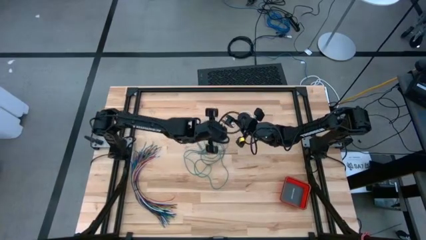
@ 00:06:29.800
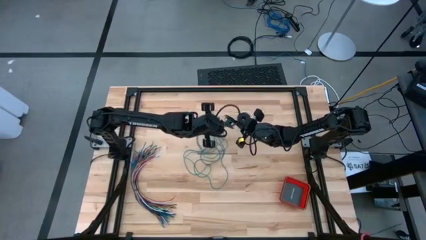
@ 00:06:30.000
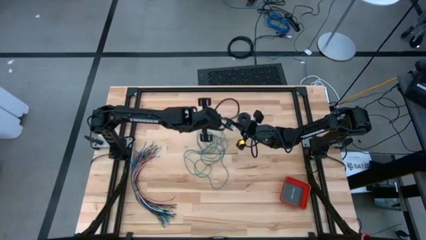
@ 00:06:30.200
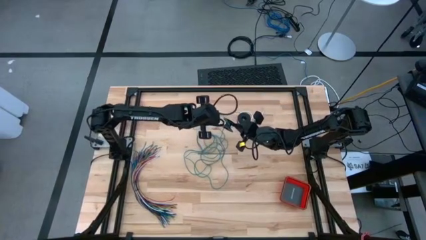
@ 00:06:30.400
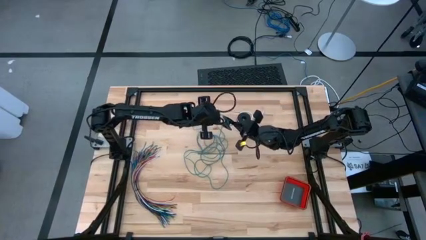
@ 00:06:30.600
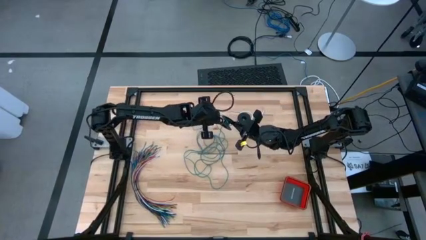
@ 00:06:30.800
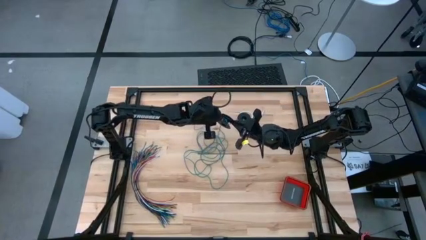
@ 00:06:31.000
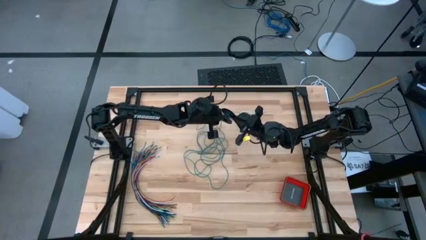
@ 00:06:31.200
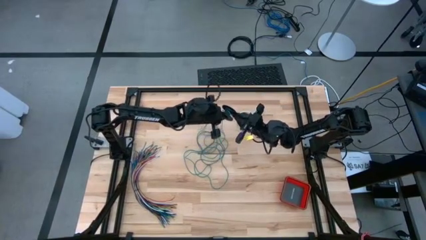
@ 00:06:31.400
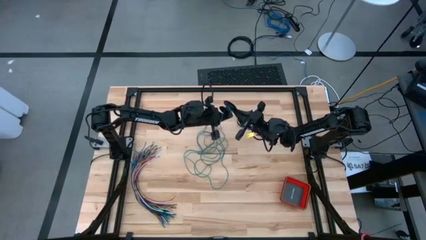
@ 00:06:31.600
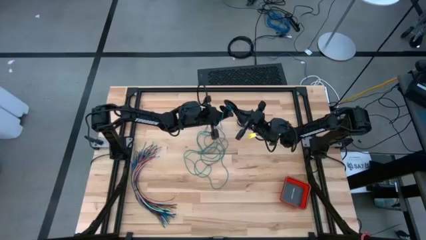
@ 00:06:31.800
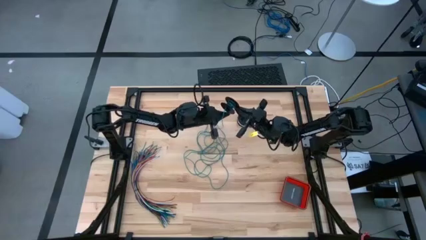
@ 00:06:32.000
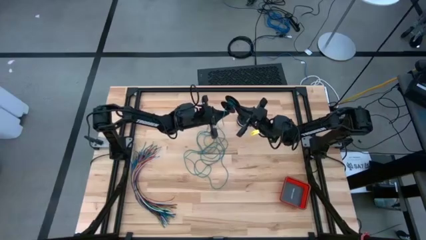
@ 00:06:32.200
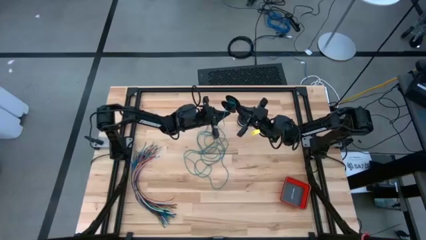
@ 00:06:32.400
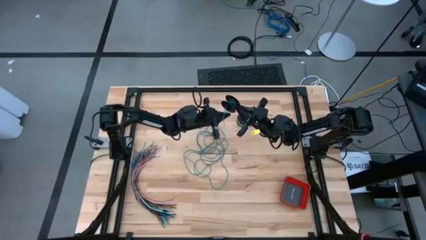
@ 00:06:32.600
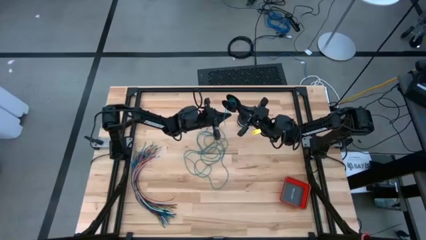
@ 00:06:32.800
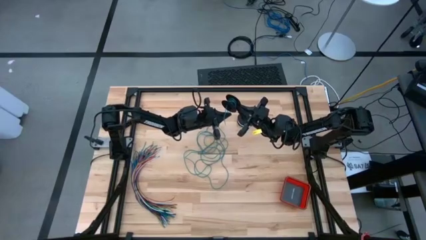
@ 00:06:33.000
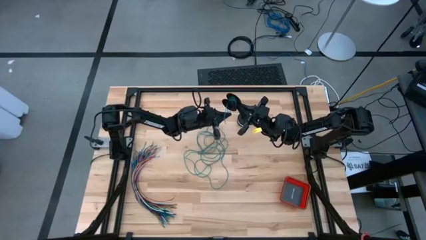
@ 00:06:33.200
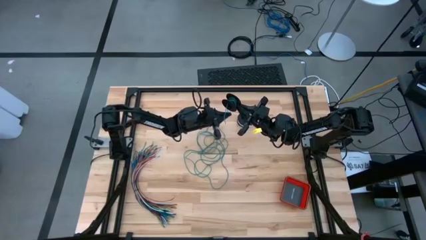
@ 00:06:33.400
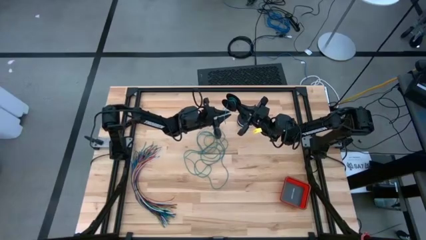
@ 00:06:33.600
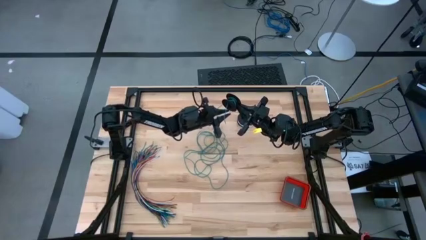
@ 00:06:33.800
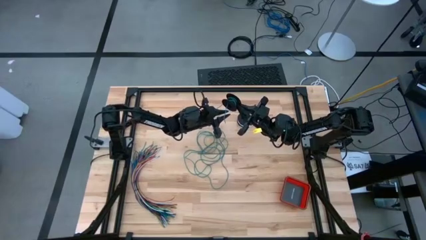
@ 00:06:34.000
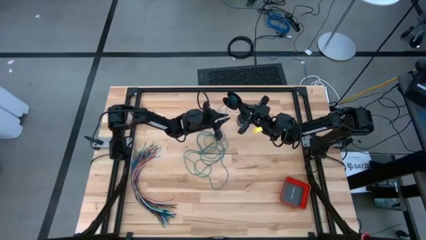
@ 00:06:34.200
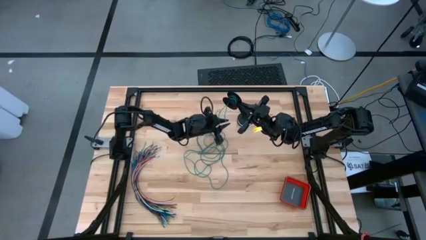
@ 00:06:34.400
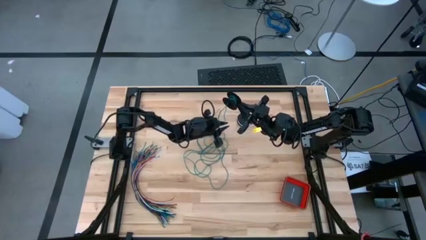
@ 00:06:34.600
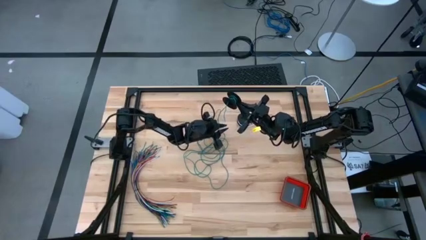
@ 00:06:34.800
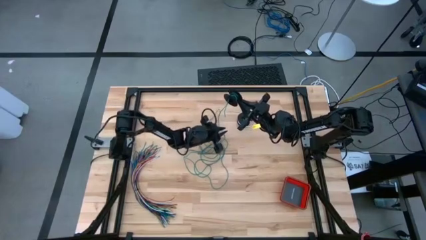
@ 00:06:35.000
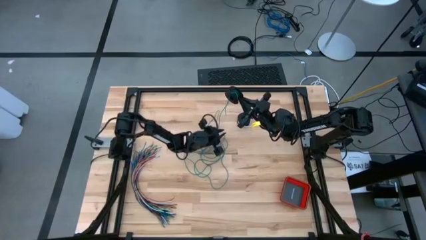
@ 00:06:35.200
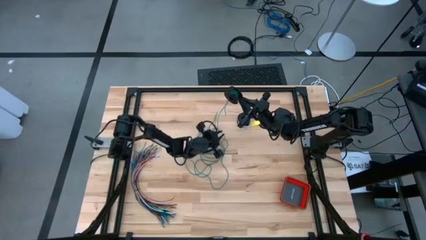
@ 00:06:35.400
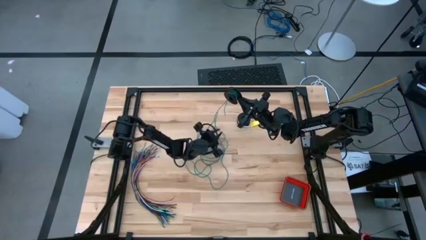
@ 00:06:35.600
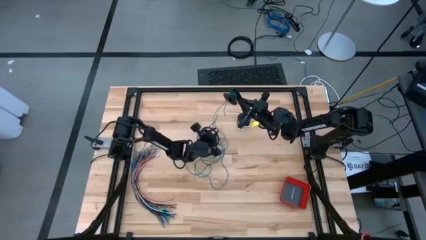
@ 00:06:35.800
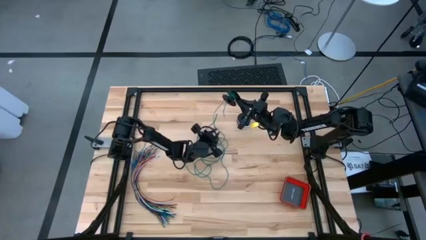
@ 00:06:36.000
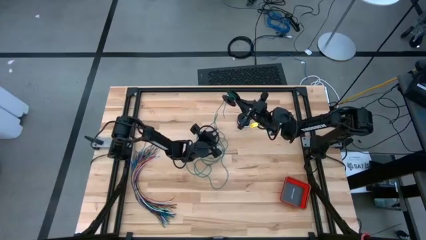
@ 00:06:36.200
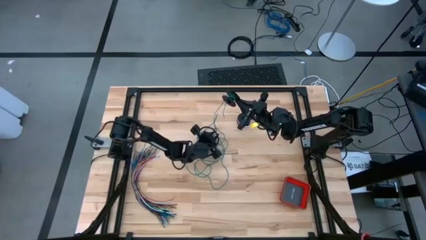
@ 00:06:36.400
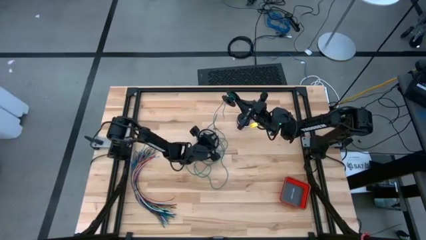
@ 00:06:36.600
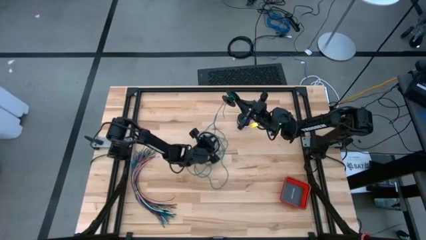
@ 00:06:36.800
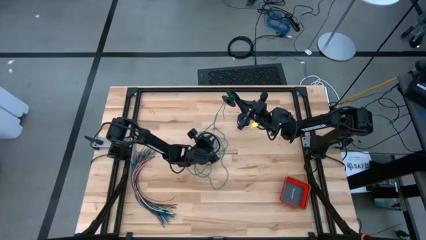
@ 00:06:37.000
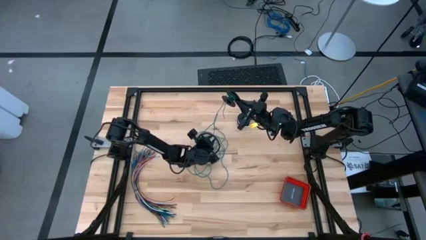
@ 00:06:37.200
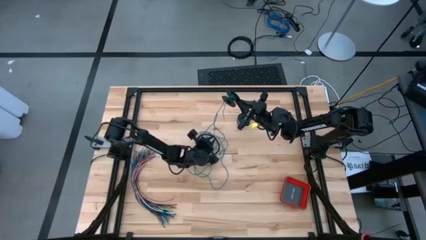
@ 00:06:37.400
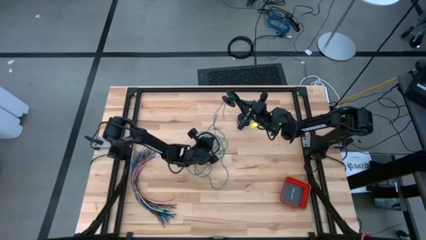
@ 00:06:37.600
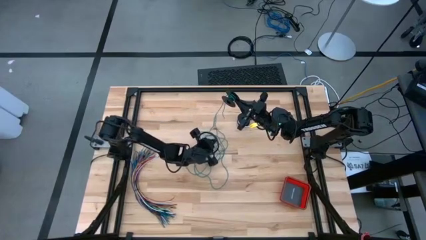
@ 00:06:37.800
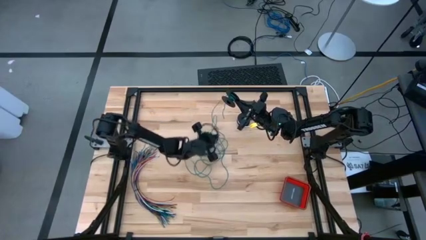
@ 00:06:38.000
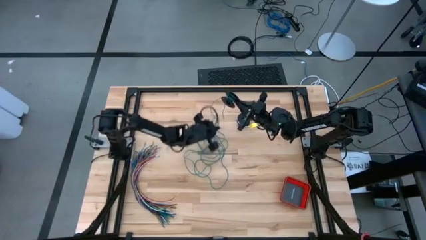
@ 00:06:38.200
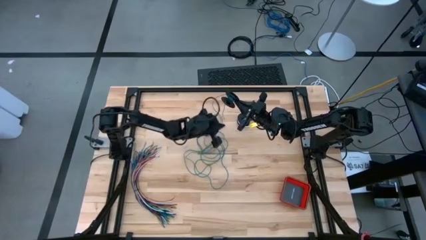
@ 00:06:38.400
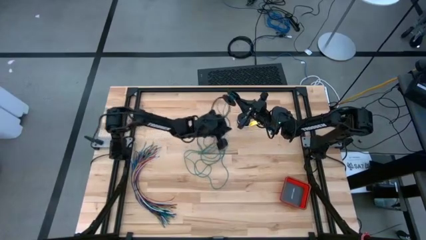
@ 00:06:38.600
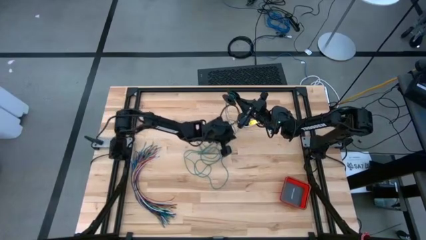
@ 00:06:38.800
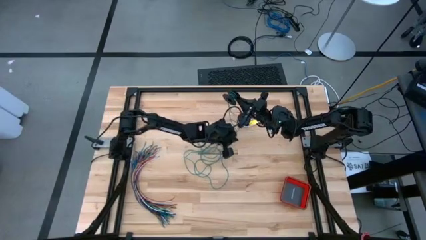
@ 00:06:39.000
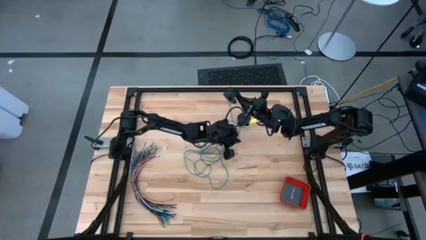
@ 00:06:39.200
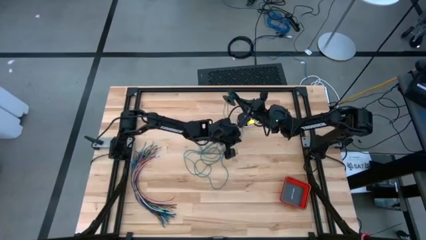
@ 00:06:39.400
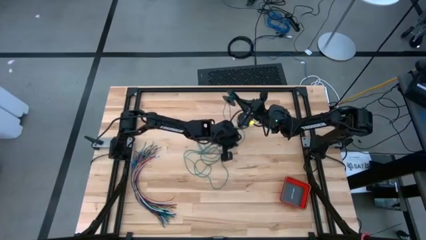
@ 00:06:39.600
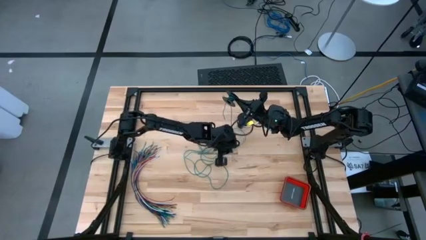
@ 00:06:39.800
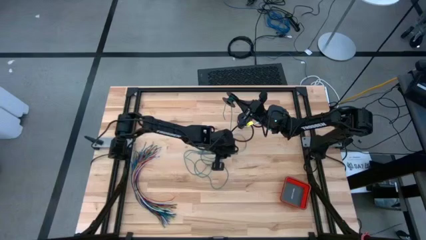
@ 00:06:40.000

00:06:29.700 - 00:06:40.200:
Task: Coil cords
Coil the green wire onto the spool

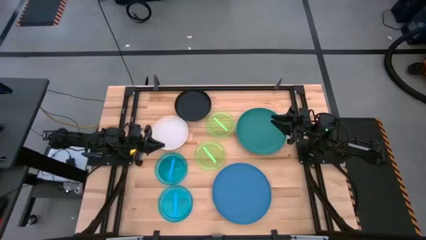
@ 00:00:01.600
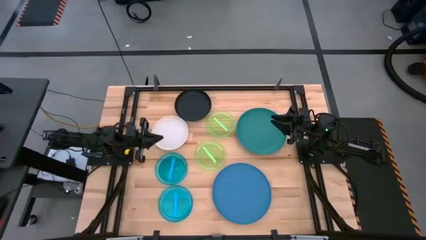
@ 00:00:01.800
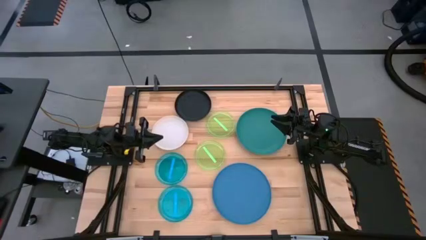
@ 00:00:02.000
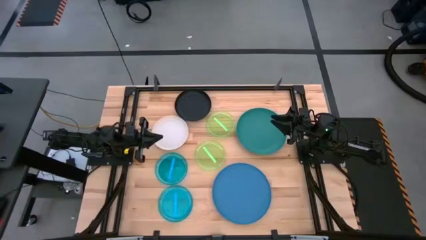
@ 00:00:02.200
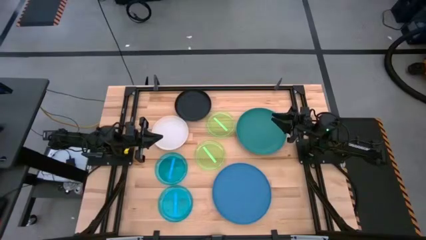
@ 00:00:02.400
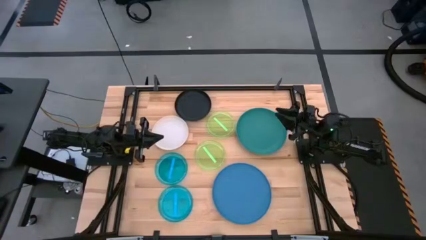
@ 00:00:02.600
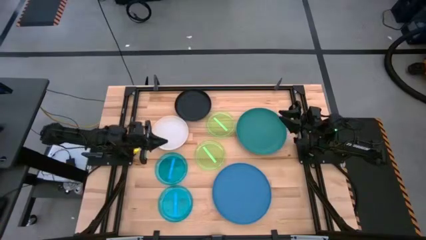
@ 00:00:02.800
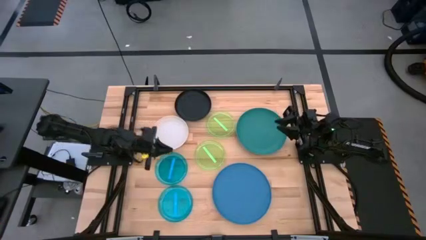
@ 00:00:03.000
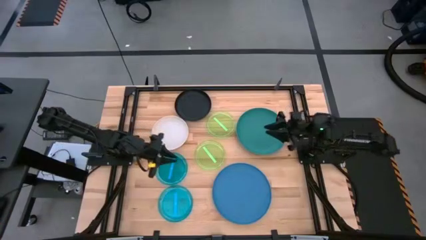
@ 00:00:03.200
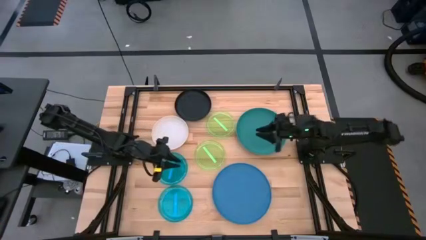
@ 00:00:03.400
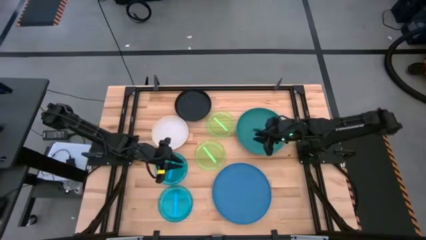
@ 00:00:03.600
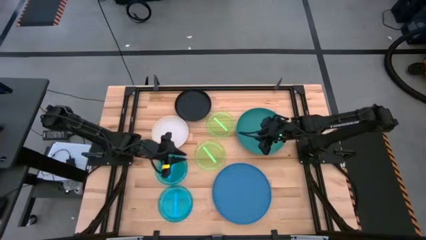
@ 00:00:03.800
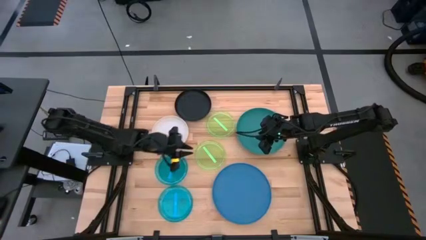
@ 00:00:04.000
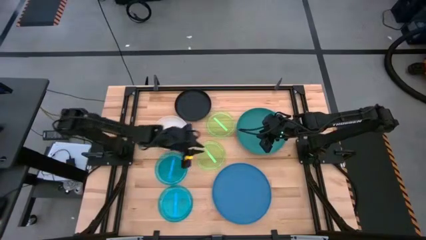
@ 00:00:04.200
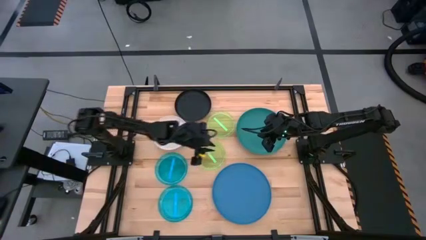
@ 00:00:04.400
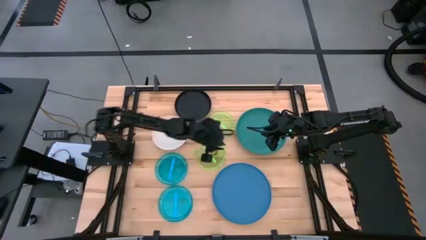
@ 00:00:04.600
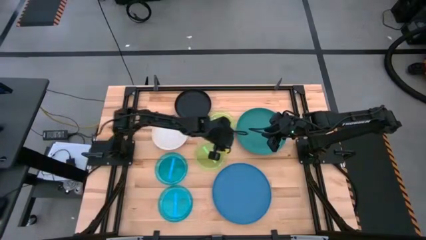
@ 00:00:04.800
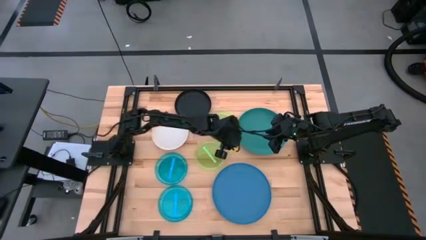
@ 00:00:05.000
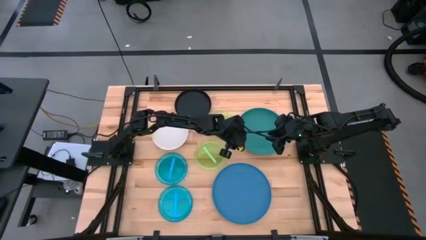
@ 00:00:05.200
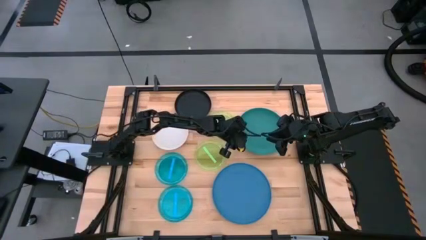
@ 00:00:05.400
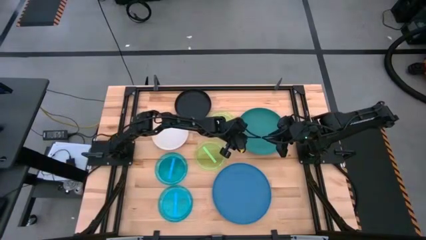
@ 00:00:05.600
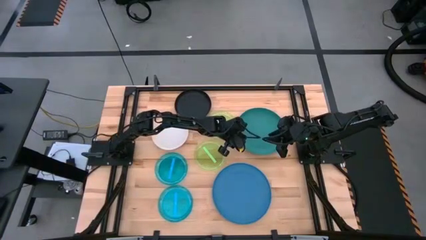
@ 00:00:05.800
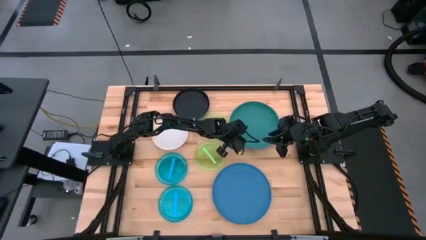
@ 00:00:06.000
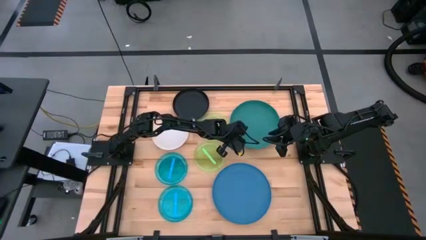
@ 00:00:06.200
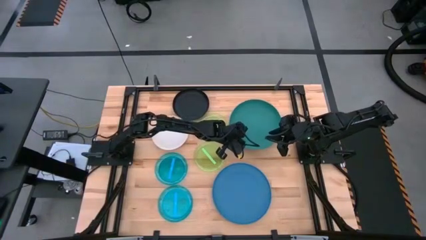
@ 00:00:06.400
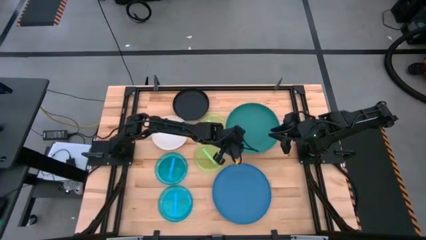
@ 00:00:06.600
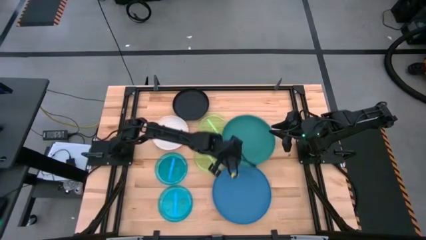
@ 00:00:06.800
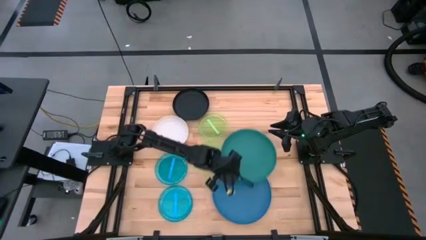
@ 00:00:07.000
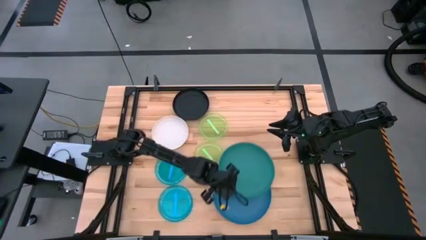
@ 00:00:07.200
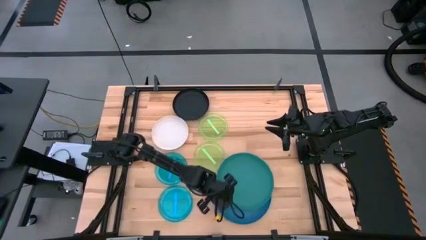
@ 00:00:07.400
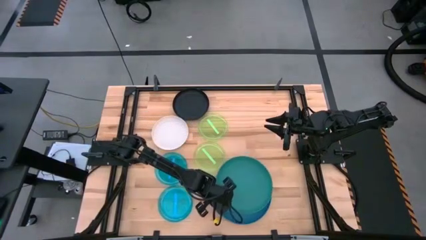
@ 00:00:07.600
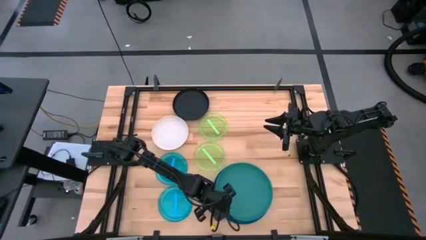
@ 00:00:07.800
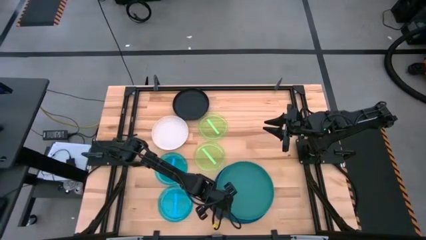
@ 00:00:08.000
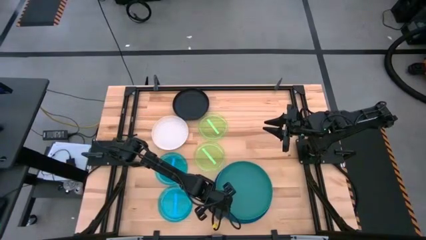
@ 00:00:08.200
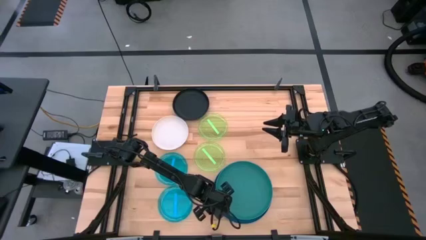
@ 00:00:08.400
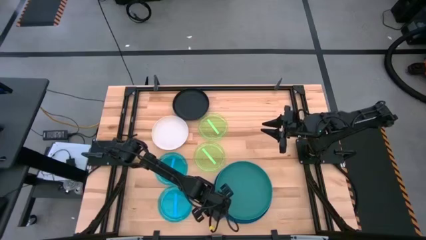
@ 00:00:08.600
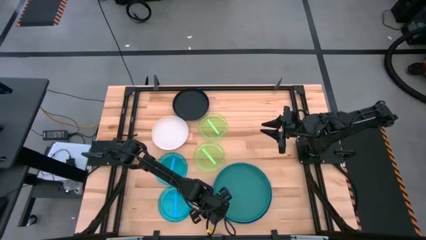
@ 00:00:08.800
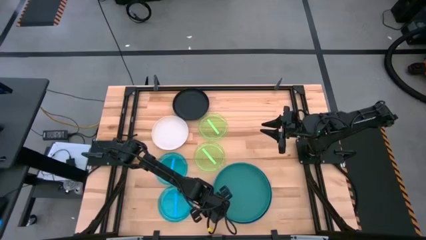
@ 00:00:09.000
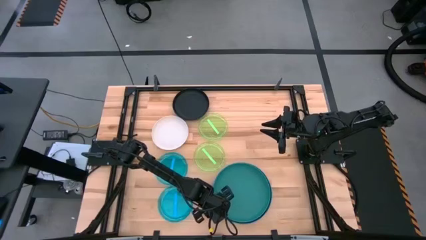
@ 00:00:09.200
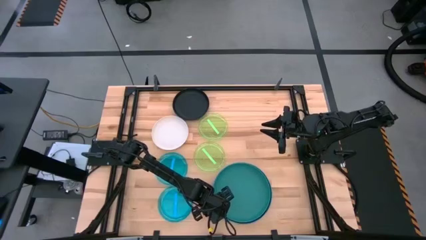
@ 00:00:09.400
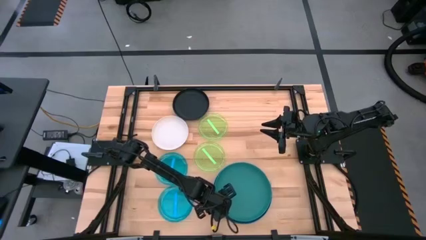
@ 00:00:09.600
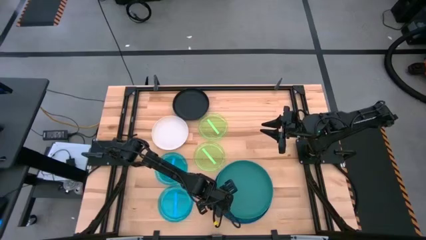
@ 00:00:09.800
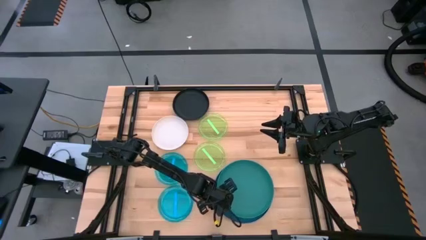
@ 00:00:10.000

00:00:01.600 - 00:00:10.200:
Task: Stack plastic plates
Stack the green plate on top of the blue plate
